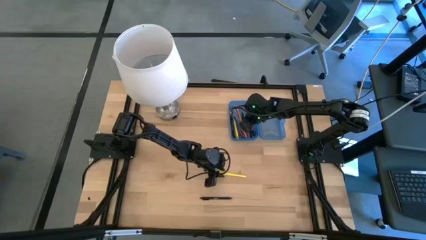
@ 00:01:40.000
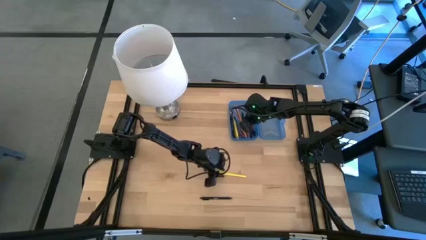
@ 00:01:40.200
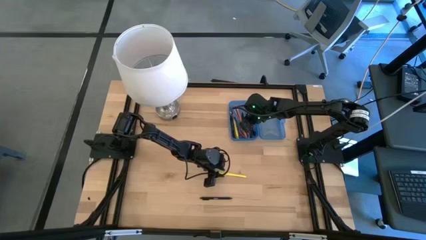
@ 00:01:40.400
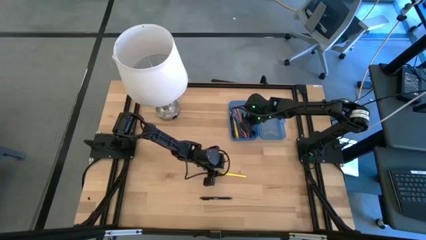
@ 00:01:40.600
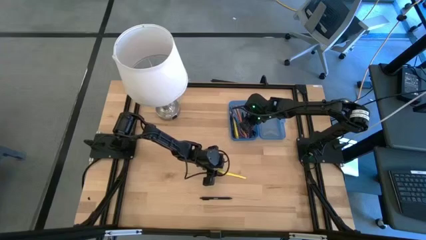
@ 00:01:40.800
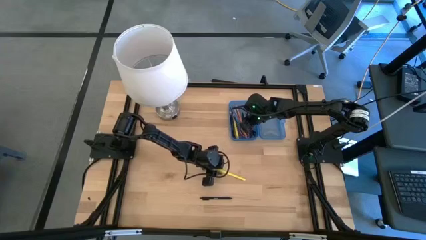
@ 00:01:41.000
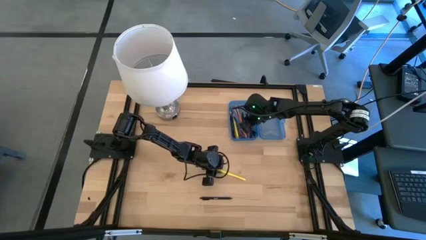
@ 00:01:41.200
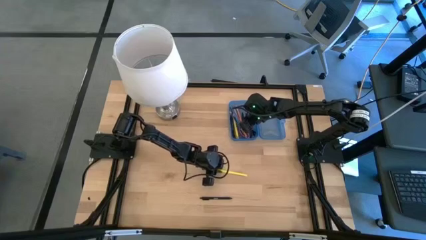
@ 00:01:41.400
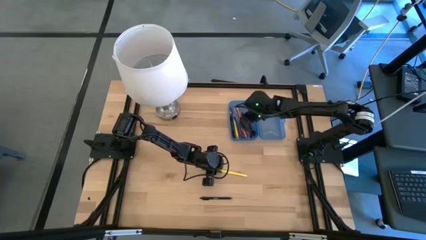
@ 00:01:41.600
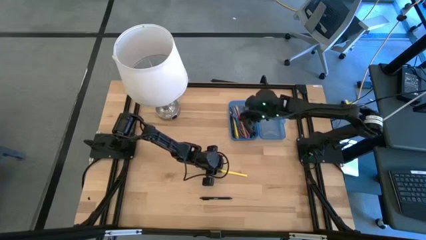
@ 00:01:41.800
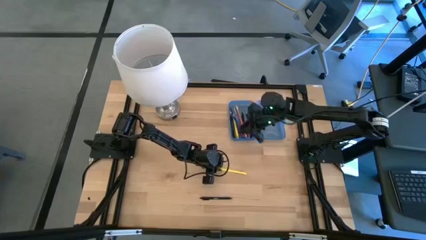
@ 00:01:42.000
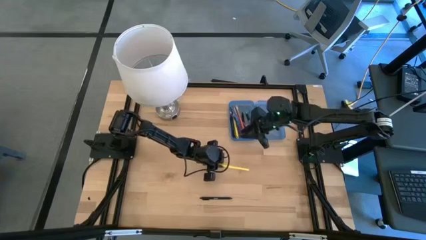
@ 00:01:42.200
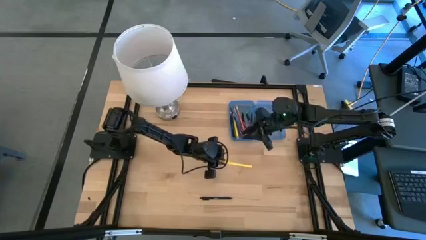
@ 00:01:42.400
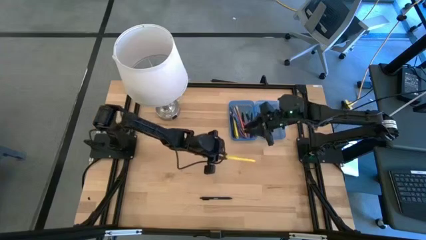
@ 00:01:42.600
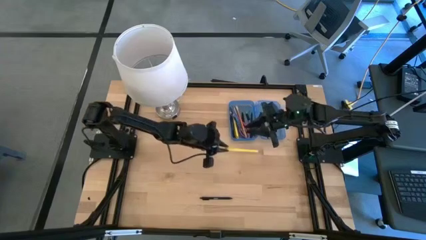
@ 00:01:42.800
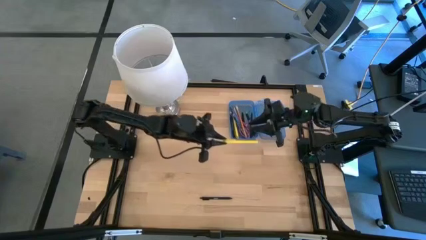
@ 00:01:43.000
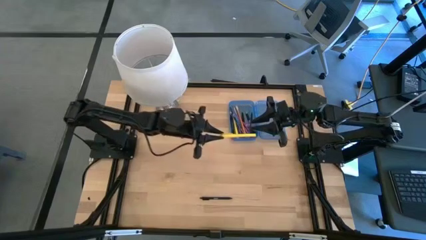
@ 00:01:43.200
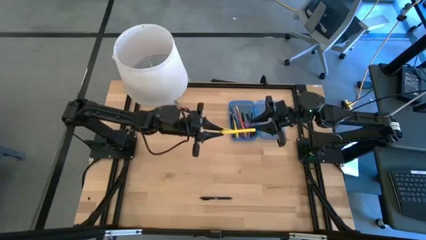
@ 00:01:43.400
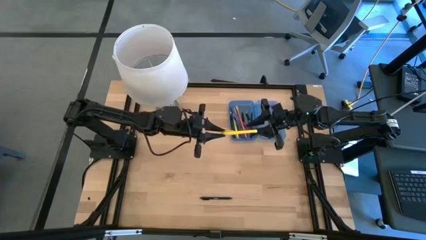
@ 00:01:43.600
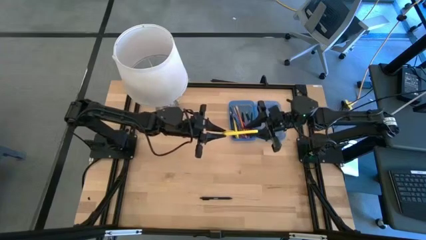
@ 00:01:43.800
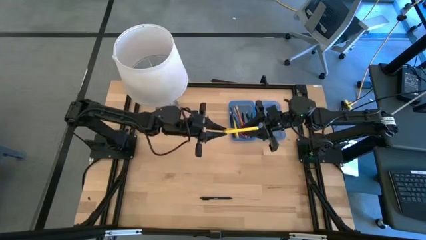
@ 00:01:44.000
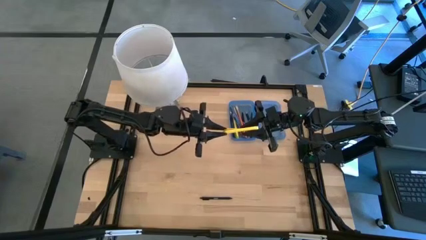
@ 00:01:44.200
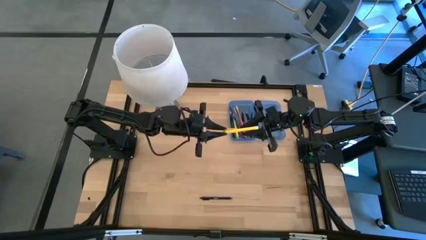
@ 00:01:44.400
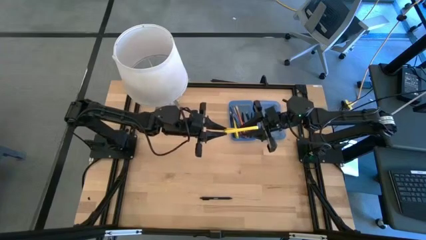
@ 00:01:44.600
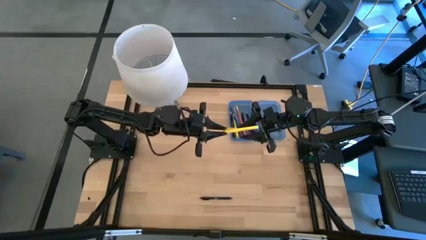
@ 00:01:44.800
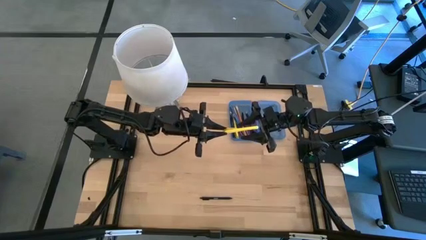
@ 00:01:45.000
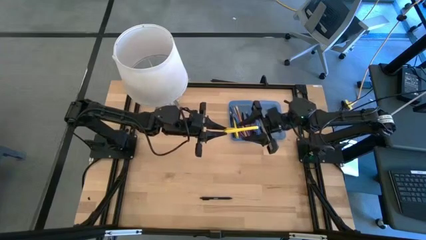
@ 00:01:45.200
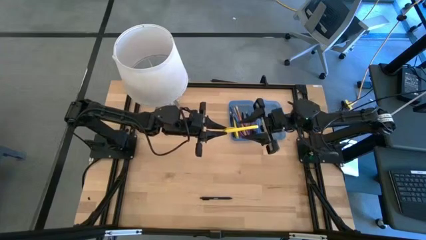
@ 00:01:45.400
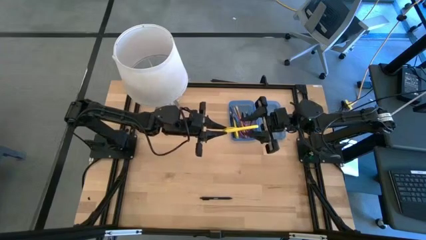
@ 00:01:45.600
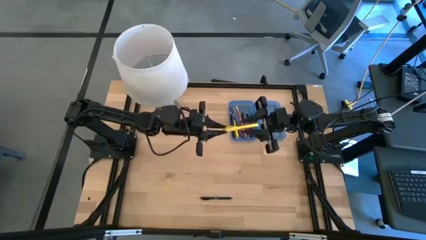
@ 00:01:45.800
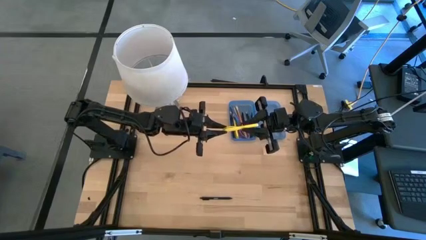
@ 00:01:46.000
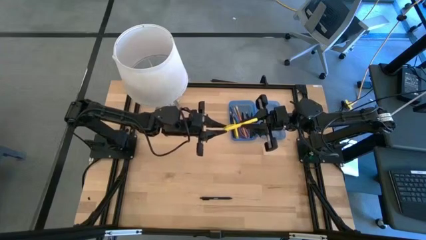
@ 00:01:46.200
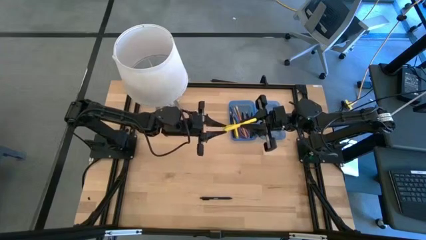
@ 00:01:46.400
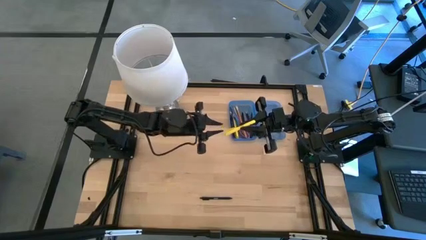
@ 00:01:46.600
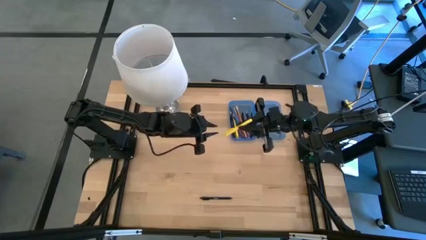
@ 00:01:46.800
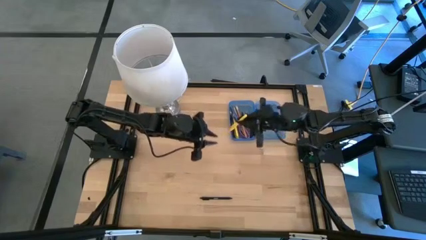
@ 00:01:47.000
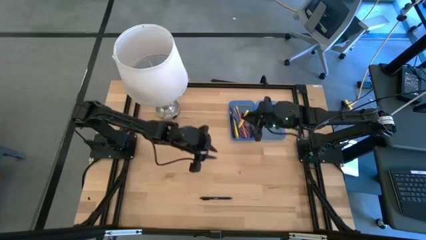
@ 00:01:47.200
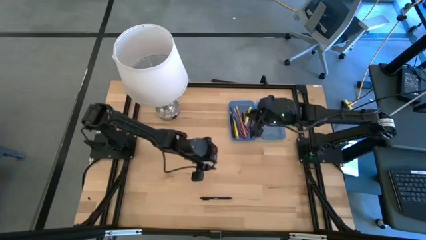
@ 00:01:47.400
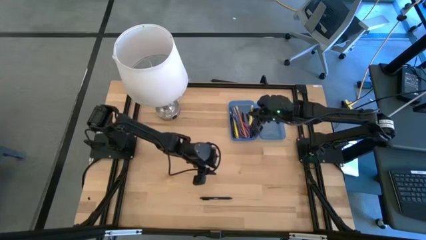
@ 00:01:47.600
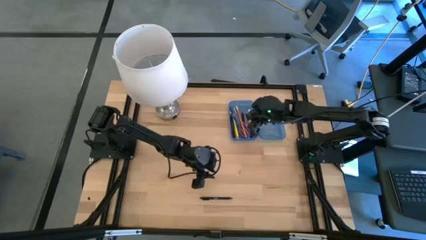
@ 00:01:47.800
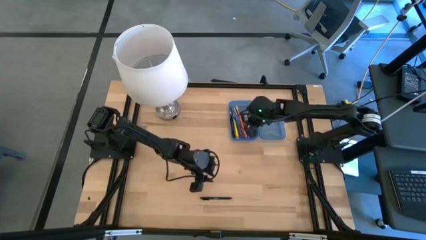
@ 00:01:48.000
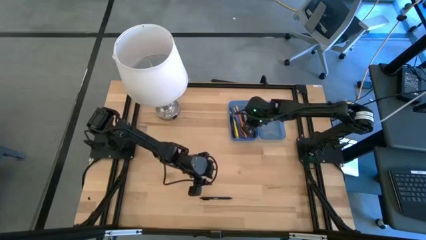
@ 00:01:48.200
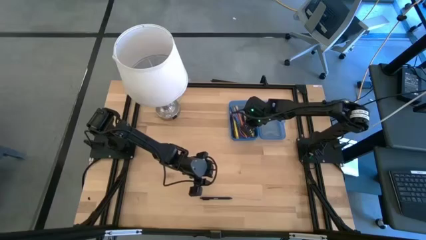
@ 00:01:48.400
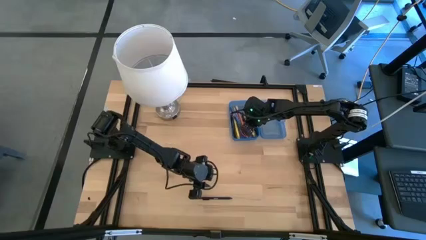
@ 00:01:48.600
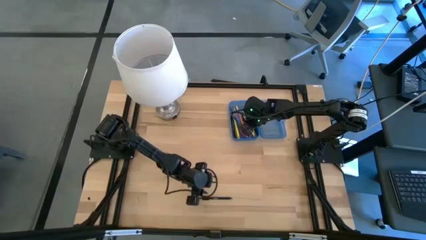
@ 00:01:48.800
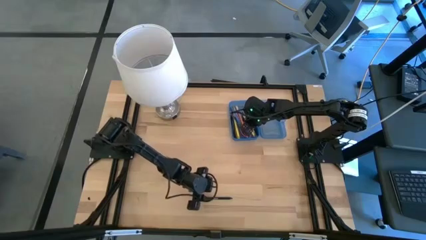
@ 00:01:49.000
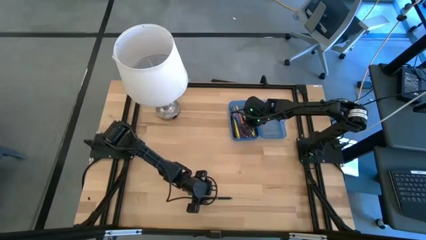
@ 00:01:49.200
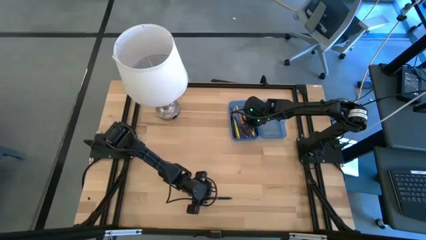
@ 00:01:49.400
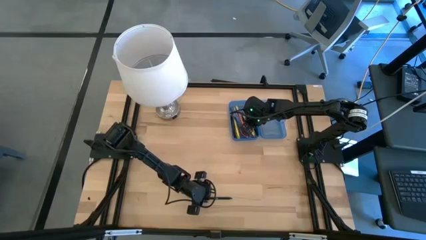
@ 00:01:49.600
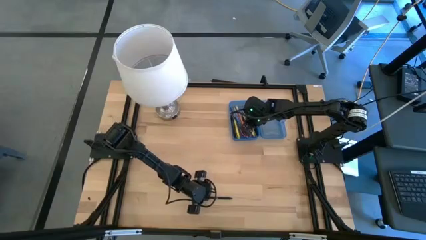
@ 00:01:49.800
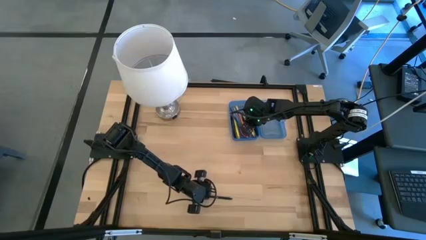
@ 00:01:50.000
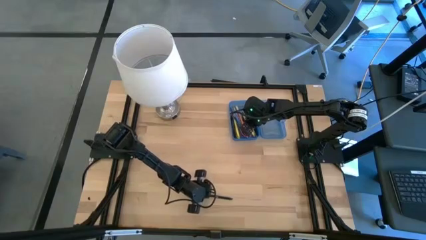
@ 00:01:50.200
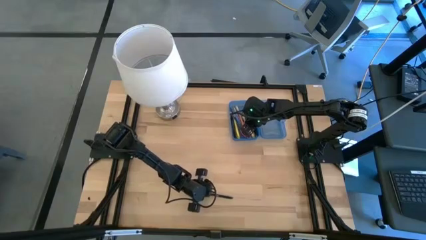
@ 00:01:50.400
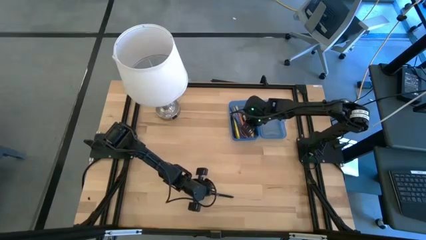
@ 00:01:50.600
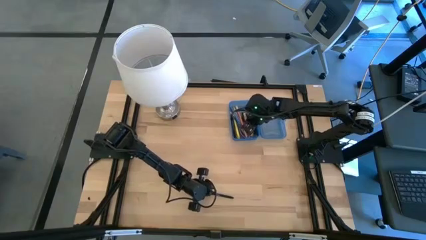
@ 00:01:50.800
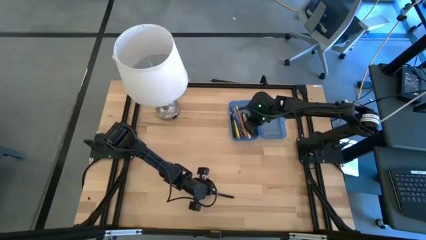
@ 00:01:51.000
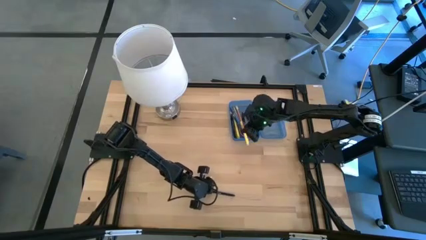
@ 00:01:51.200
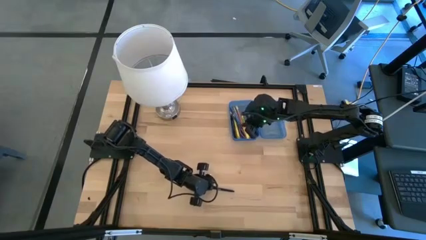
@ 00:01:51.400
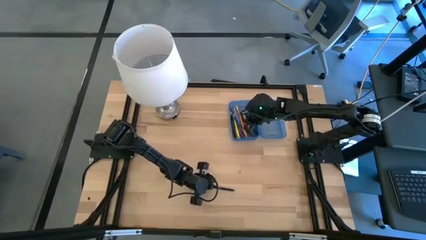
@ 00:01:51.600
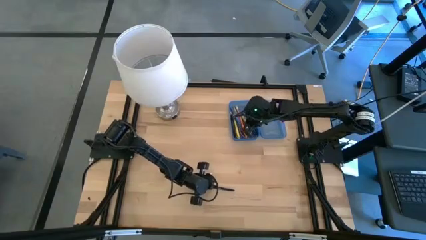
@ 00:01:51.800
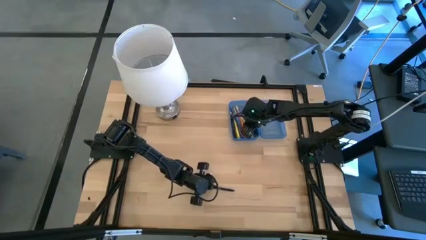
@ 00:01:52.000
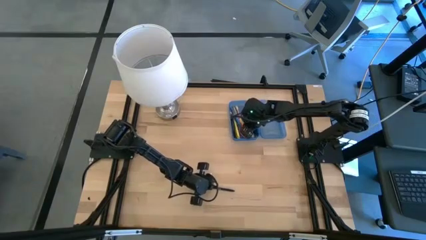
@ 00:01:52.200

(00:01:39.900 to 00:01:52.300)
Task: Pick & place school supplies into a supply box
Put the yellow pen into the blue supply box
